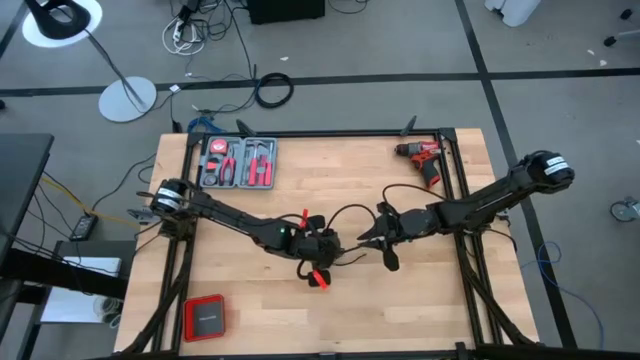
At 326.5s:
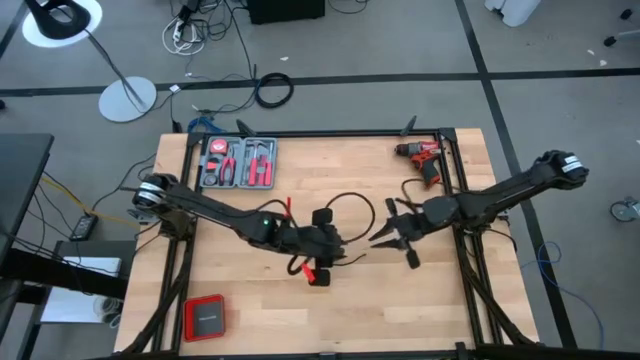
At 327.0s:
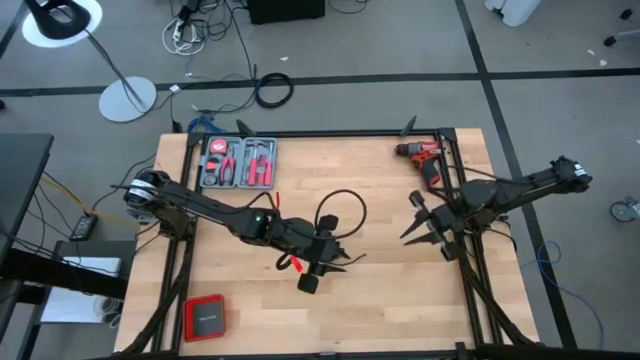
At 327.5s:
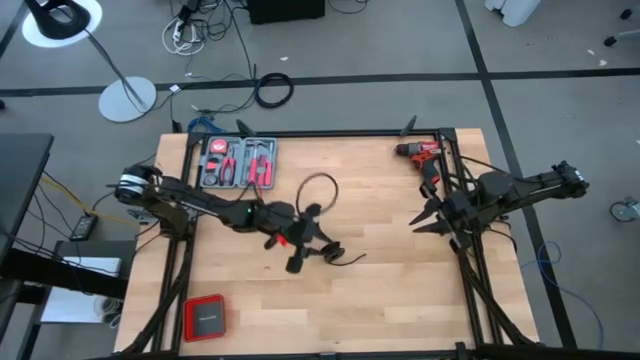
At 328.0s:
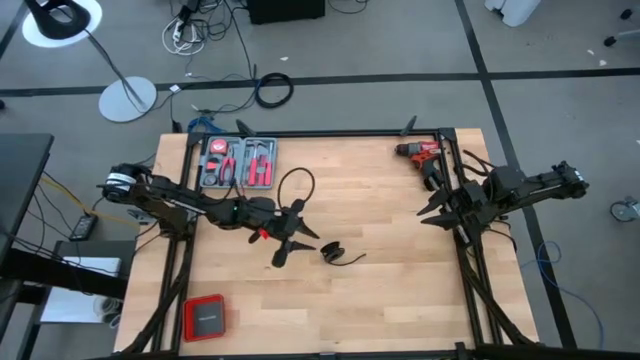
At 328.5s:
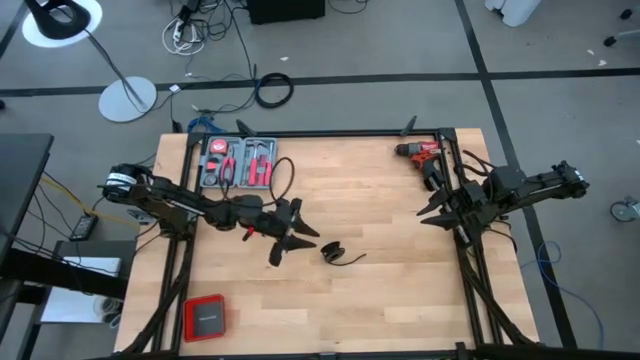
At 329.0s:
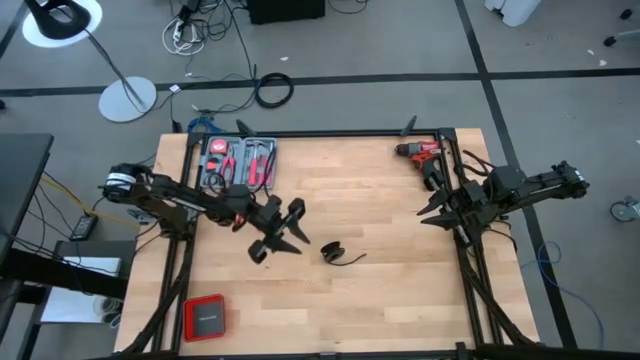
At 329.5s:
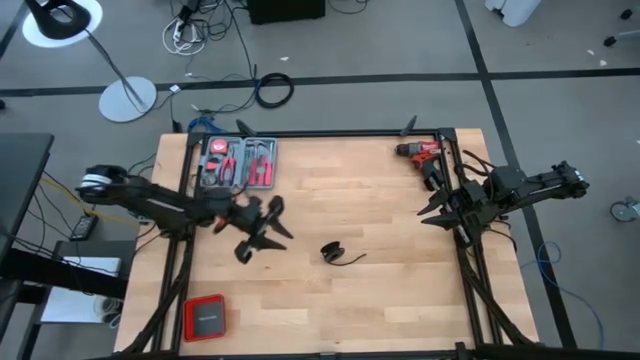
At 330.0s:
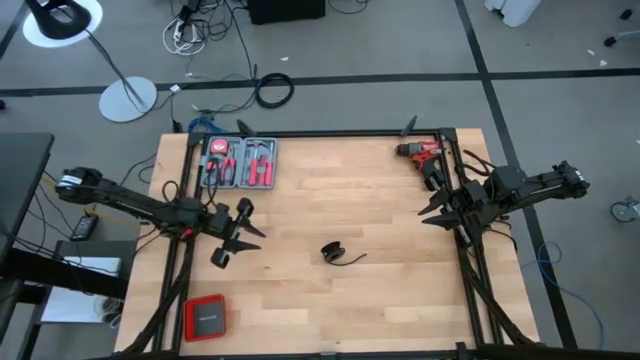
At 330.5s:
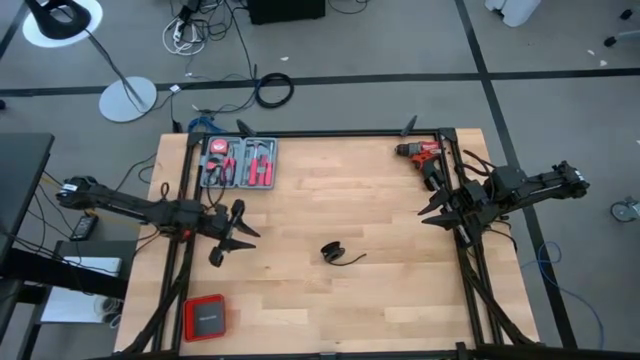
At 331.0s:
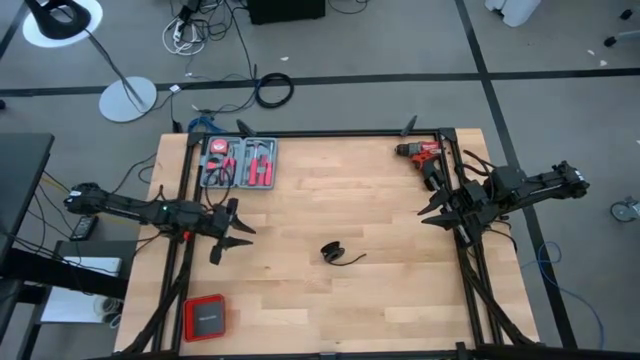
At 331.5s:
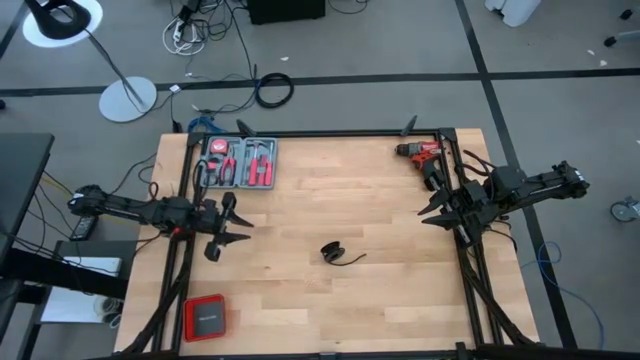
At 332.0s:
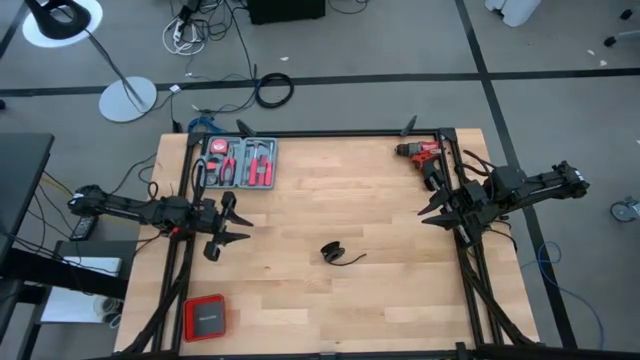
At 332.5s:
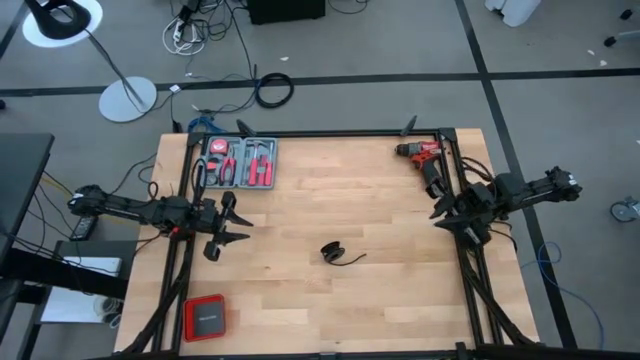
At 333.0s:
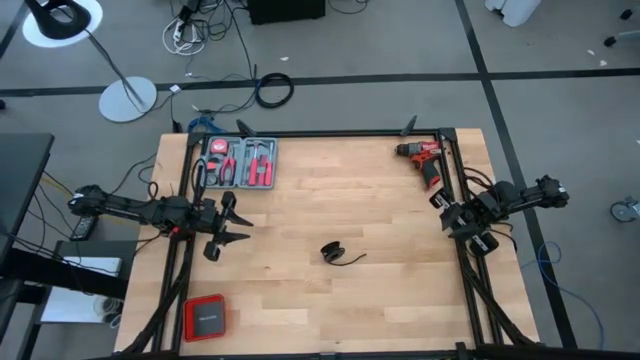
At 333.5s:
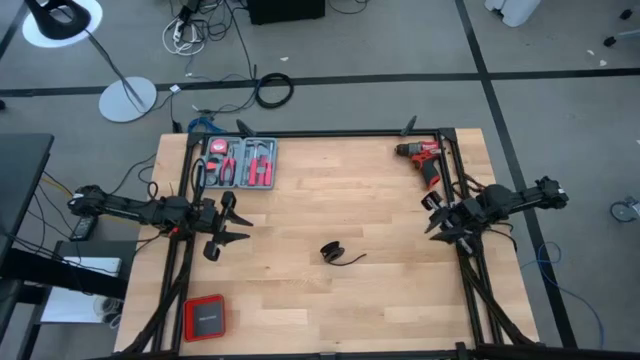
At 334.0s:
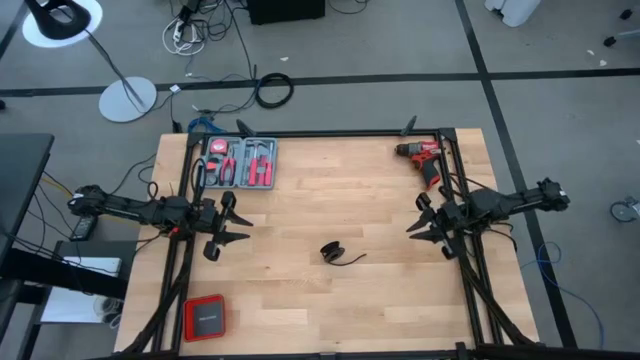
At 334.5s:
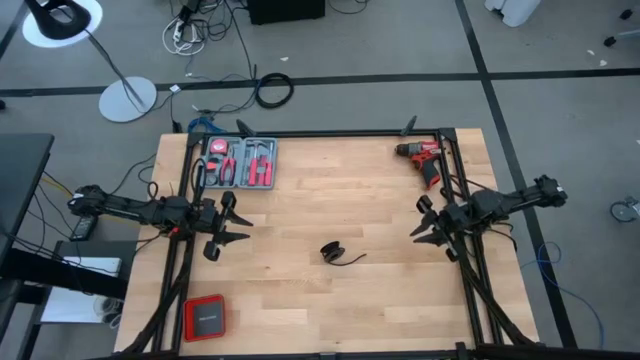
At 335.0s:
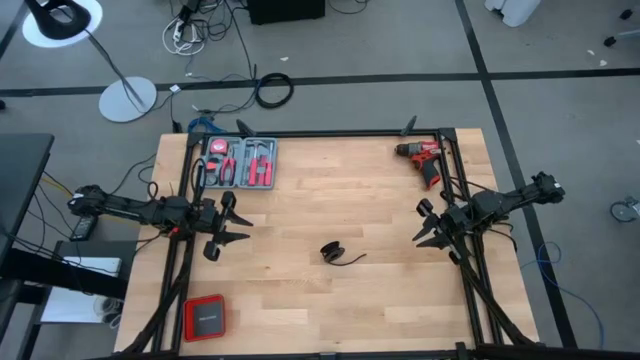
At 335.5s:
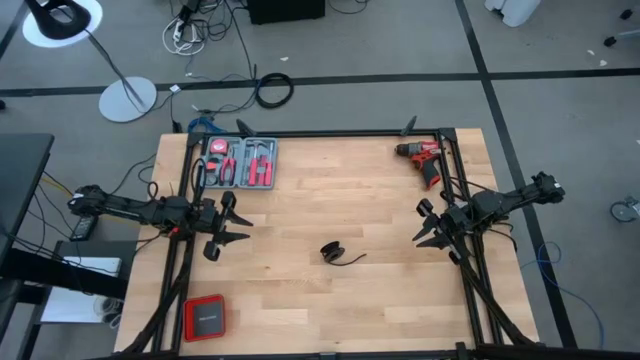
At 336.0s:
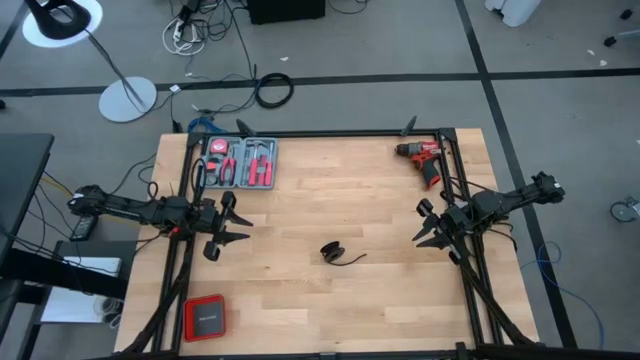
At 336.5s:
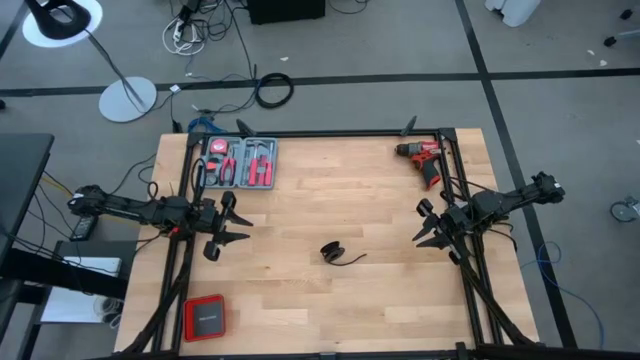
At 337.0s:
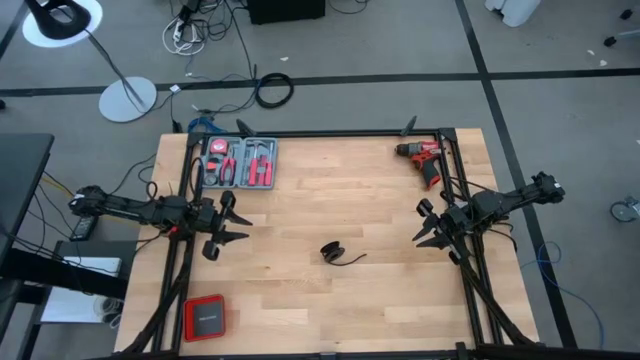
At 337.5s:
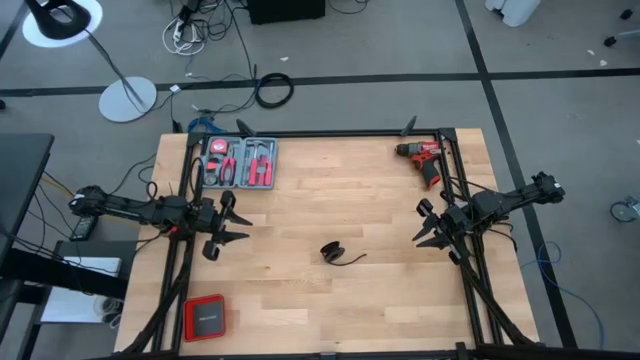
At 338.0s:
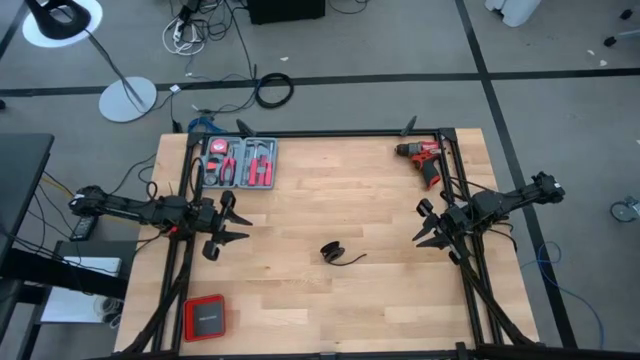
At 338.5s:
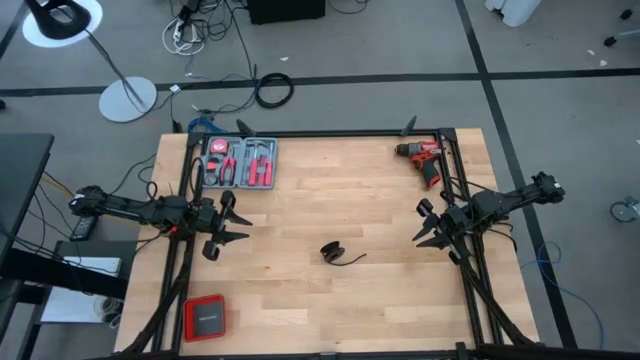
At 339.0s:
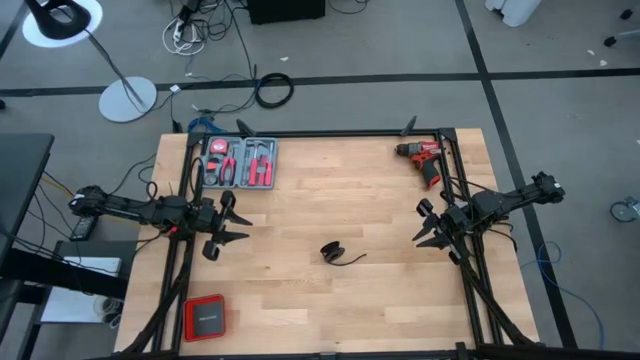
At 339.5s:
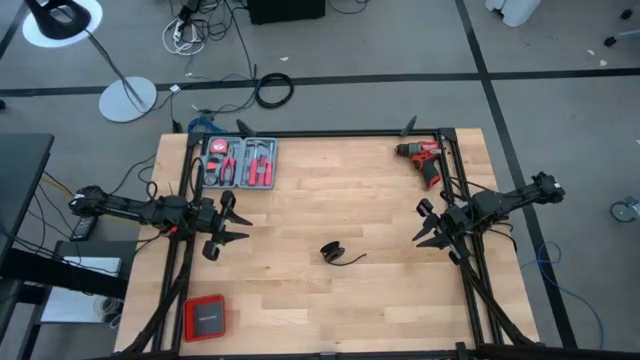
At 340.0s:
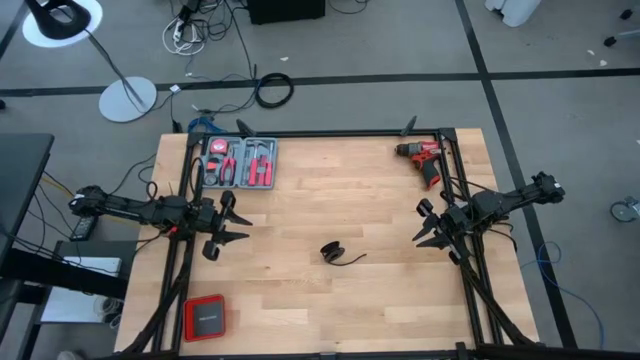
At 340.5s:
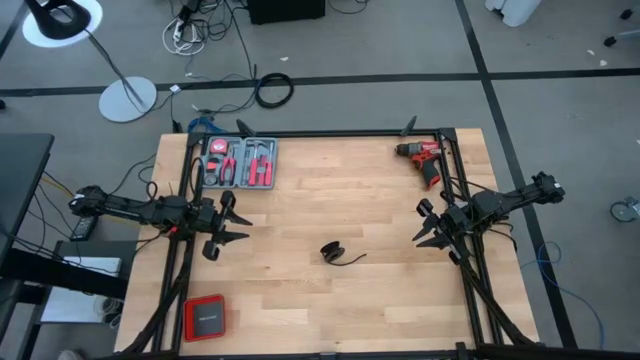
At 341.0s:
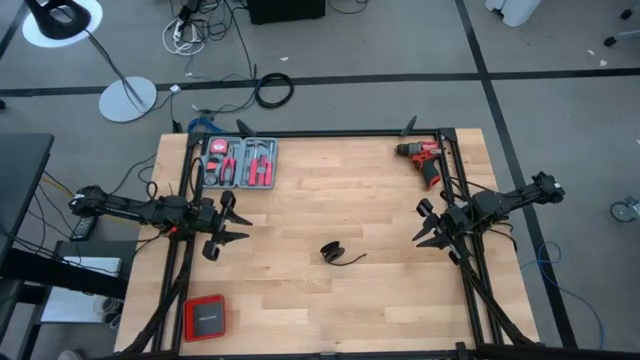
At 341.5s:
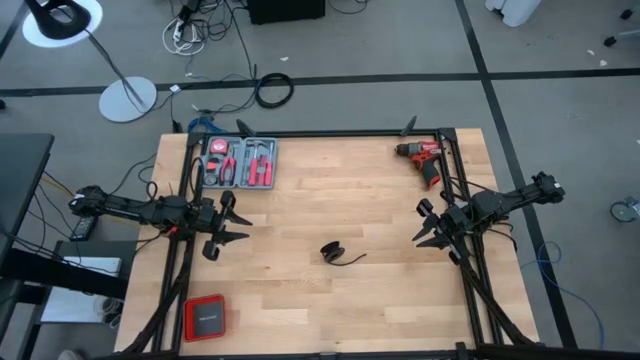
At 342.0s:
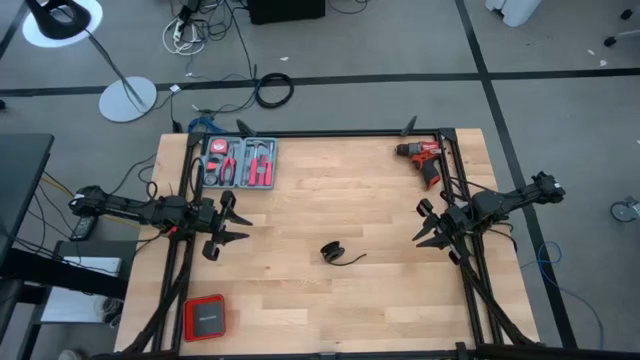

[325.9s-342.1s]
Task: Coil cords
Return to Home Position

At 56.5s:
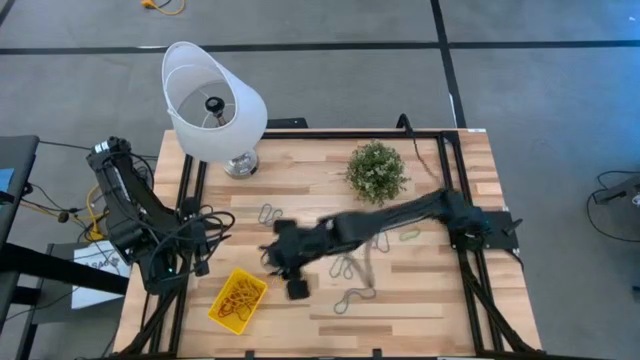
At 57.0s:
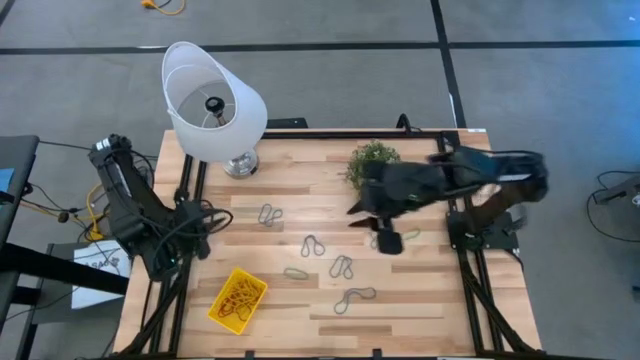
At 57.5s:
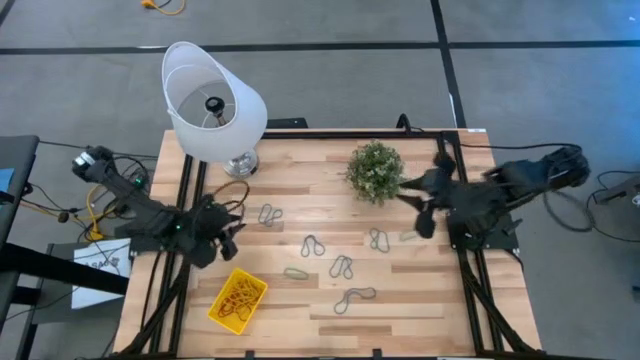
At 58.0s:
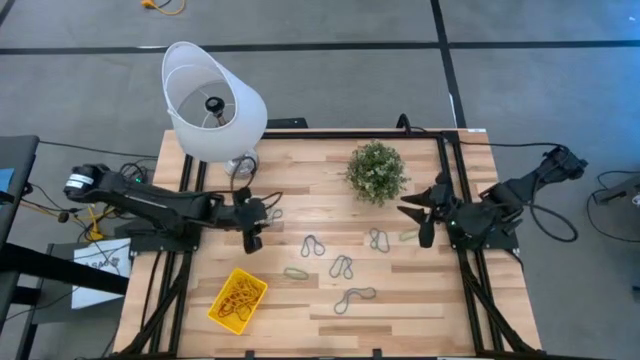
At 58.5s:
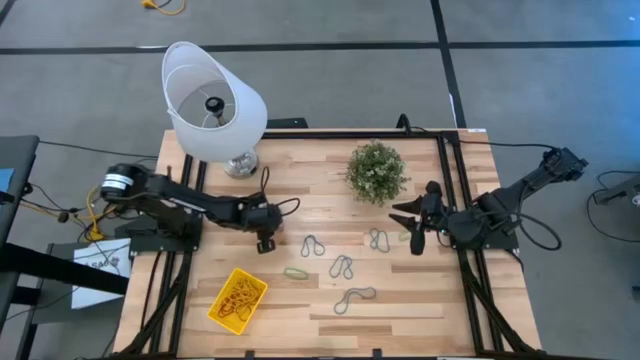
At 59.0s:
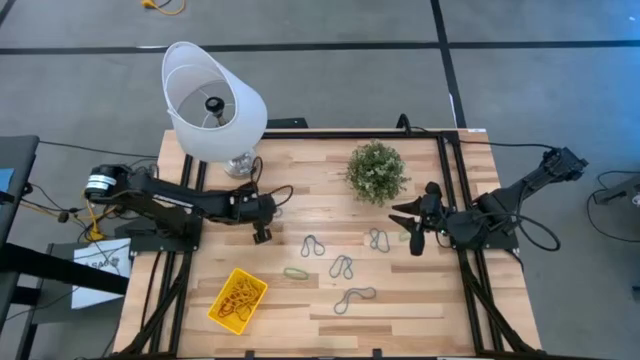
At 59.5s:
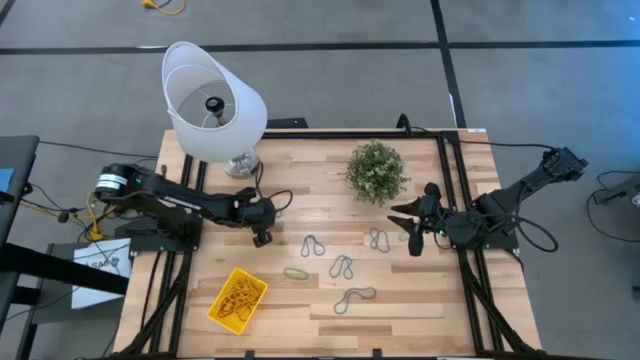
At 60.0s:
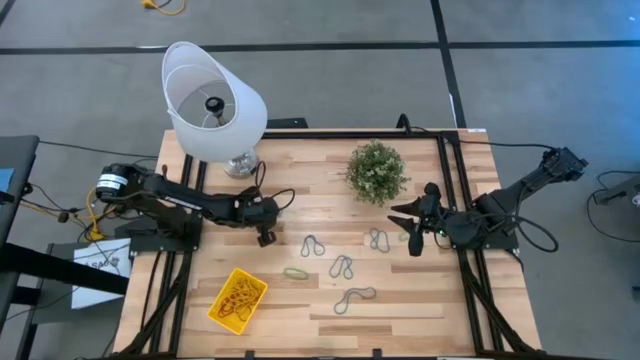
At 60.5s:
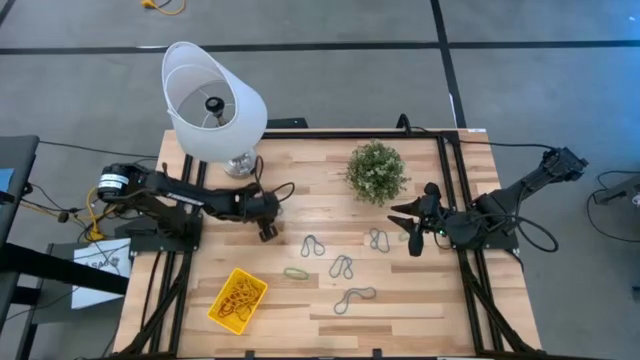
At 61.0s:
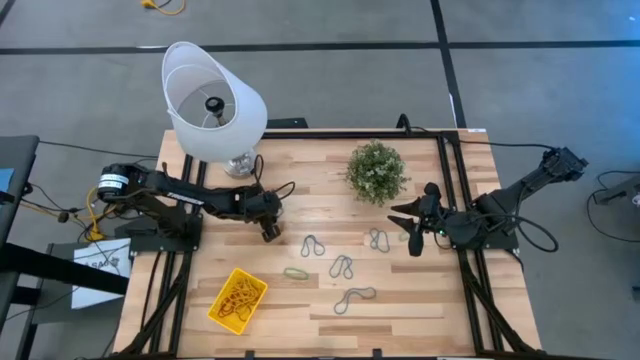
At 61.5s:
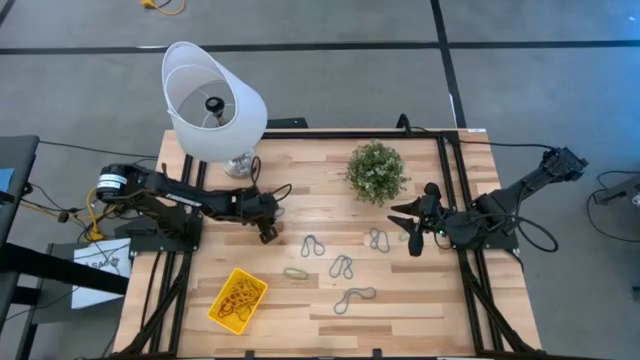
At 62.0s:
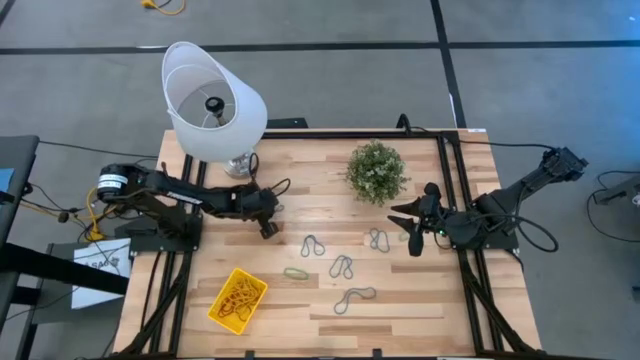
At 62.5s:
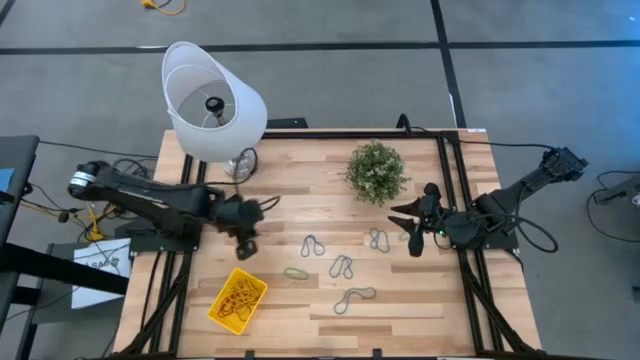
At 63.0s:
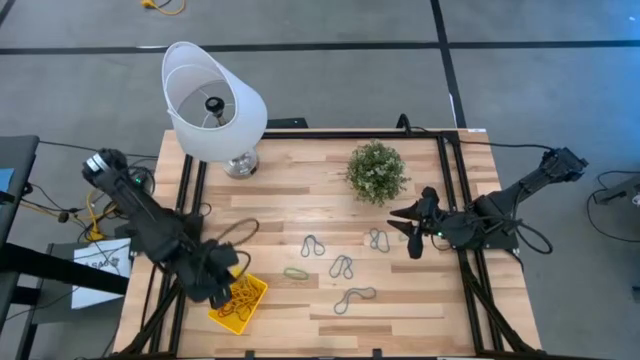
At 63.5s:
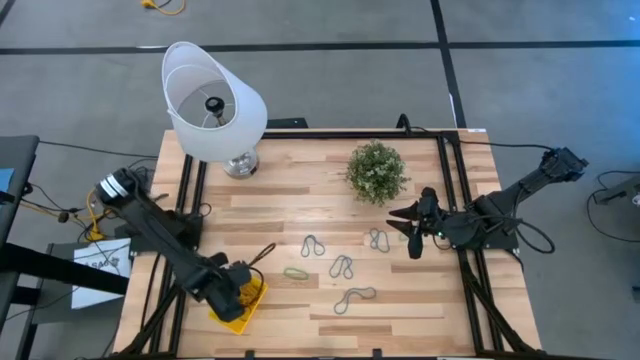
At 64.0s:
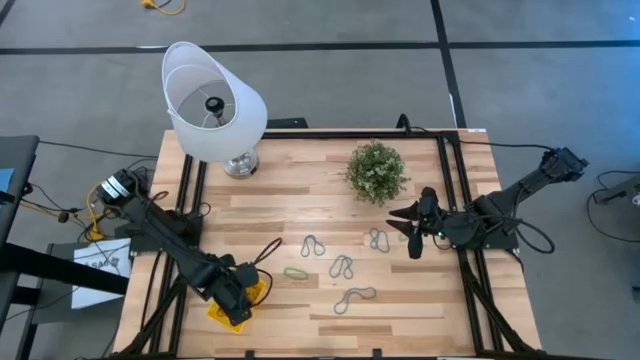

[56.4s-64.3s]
Task: Pick and place items into bin
Put the top left blue rubberband into the yellow bin
